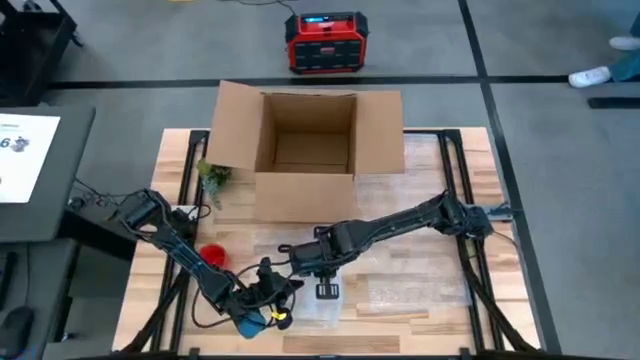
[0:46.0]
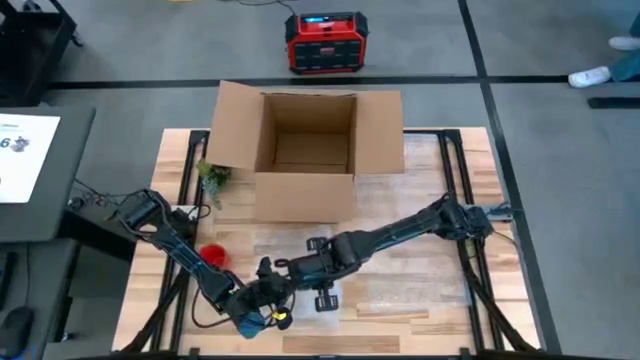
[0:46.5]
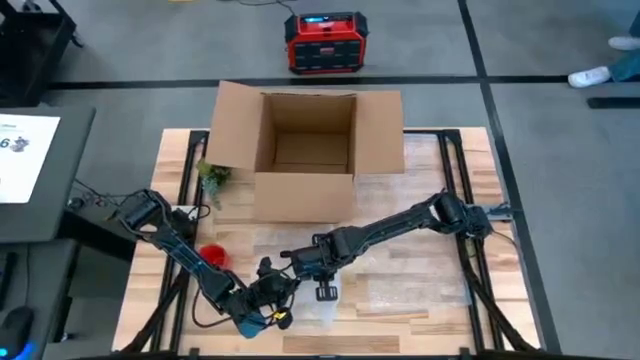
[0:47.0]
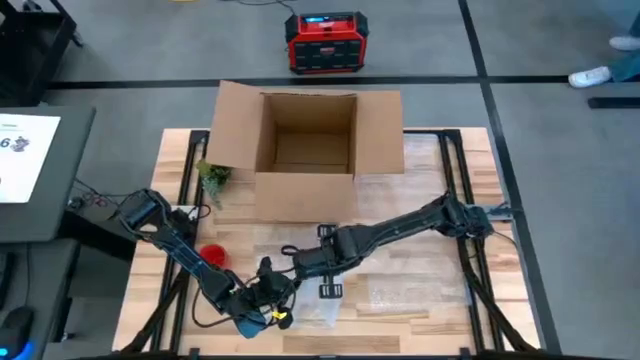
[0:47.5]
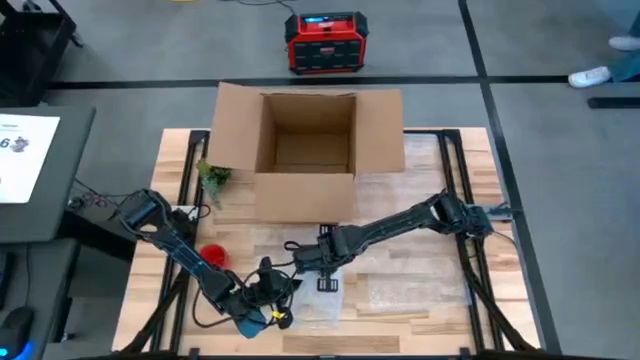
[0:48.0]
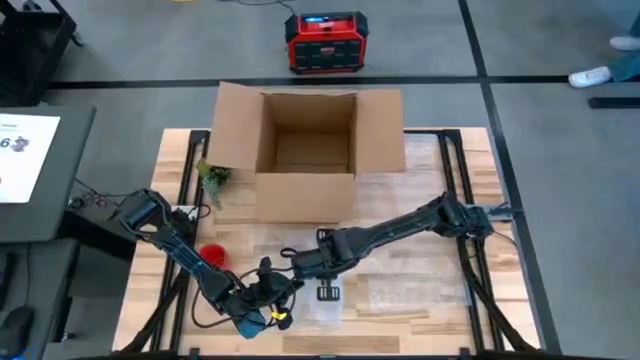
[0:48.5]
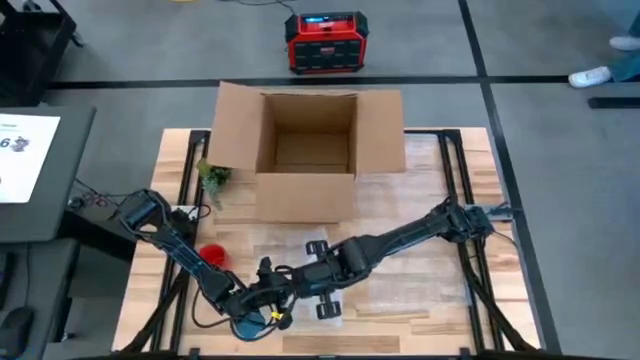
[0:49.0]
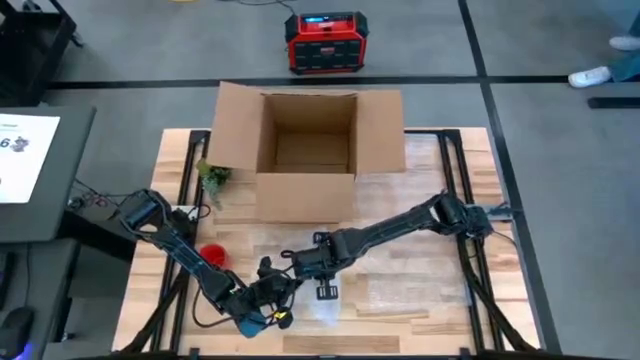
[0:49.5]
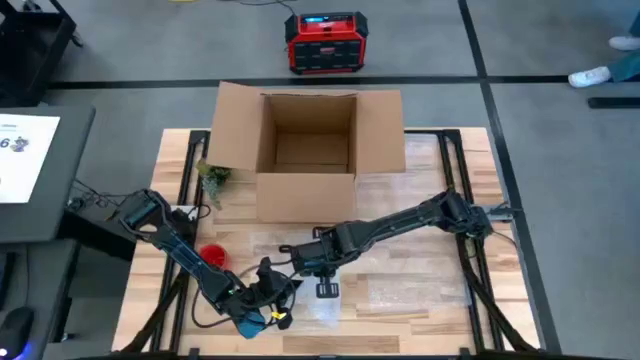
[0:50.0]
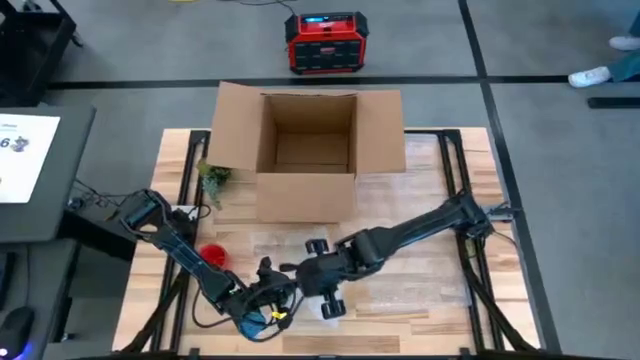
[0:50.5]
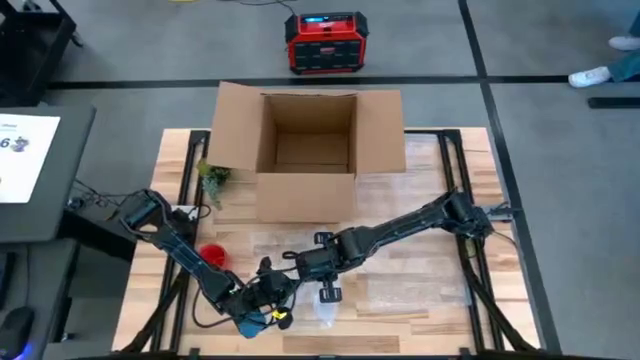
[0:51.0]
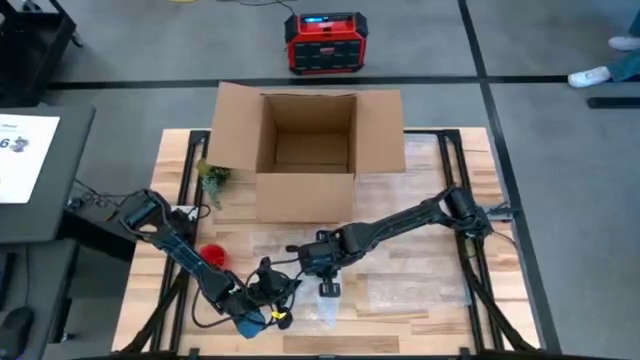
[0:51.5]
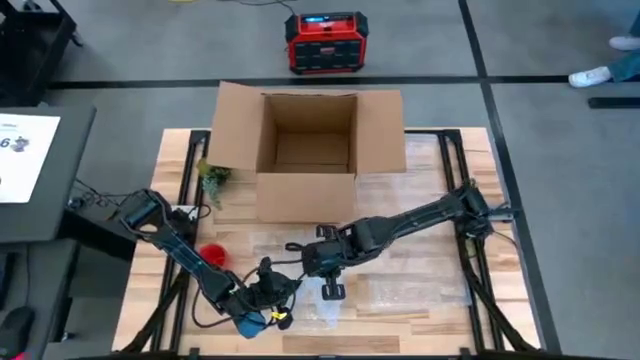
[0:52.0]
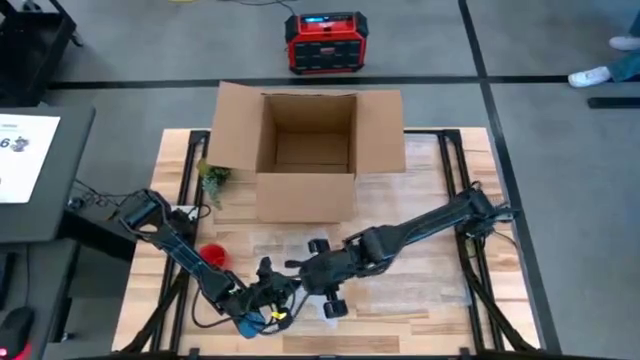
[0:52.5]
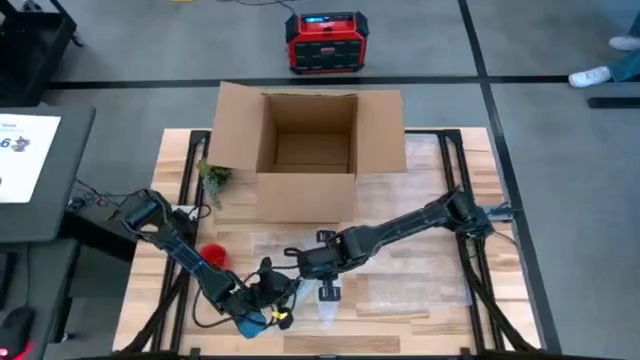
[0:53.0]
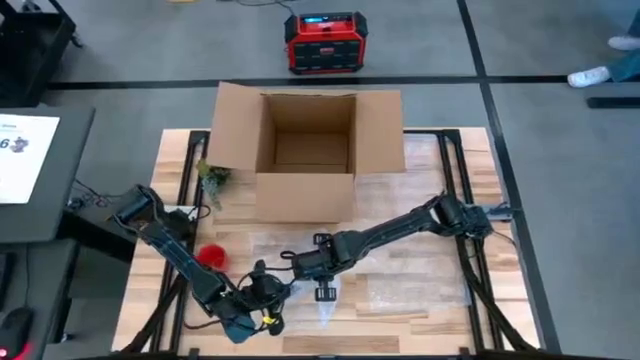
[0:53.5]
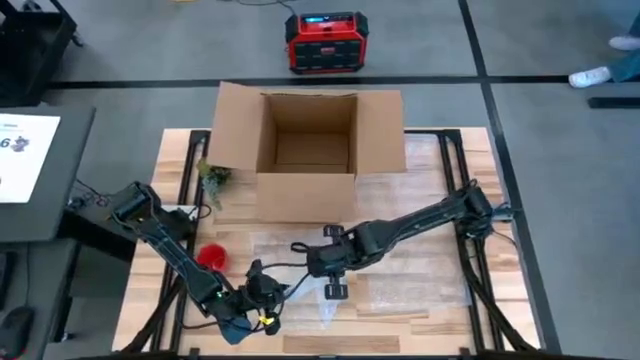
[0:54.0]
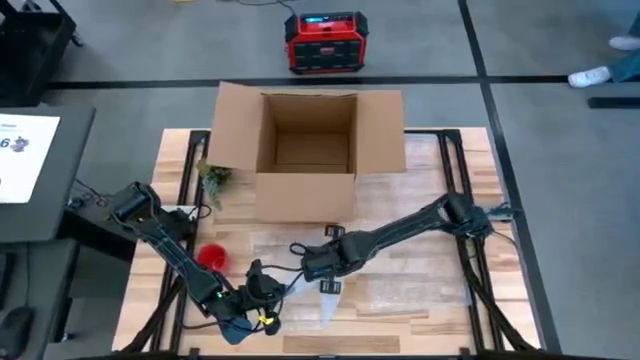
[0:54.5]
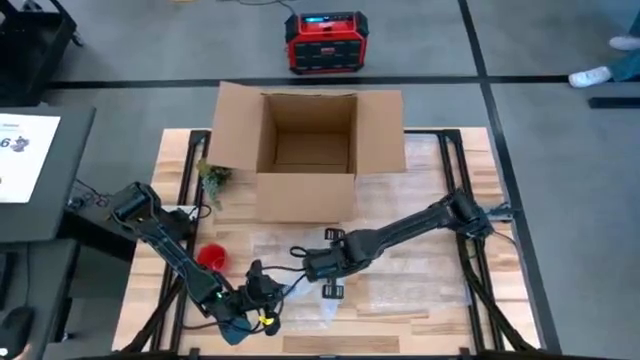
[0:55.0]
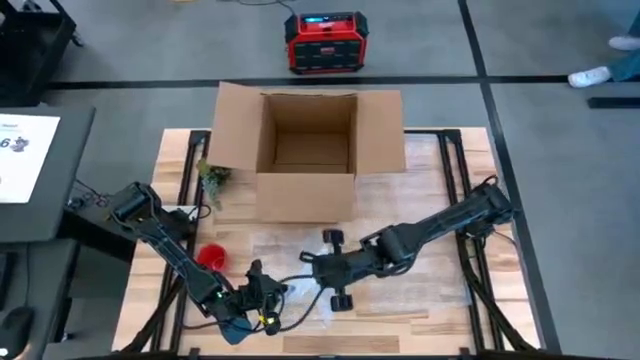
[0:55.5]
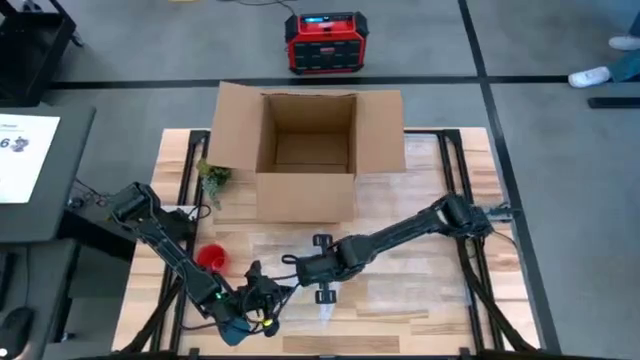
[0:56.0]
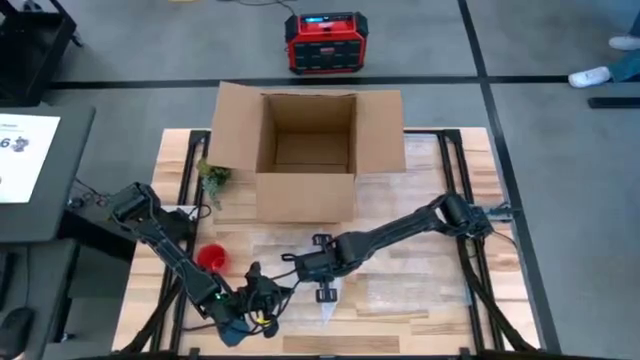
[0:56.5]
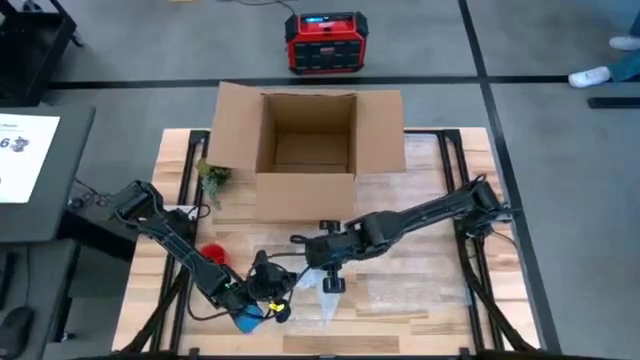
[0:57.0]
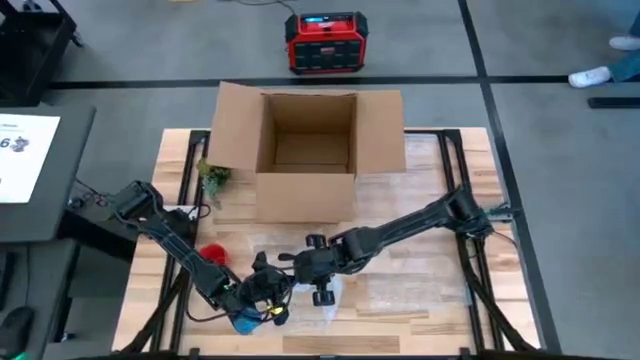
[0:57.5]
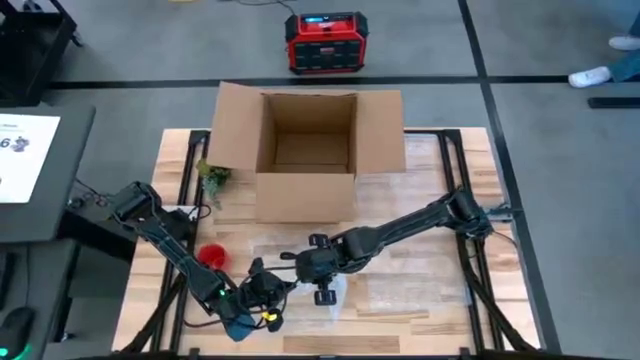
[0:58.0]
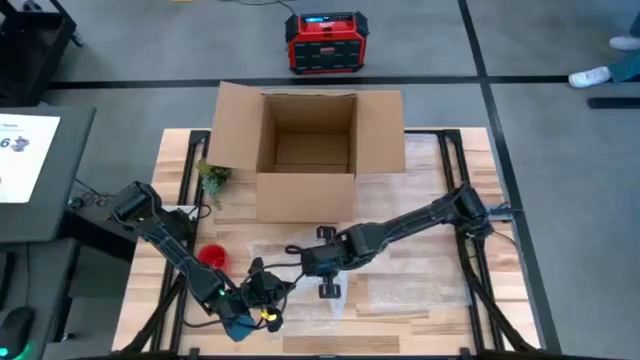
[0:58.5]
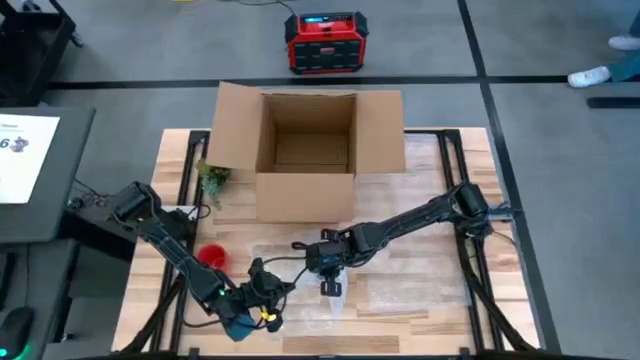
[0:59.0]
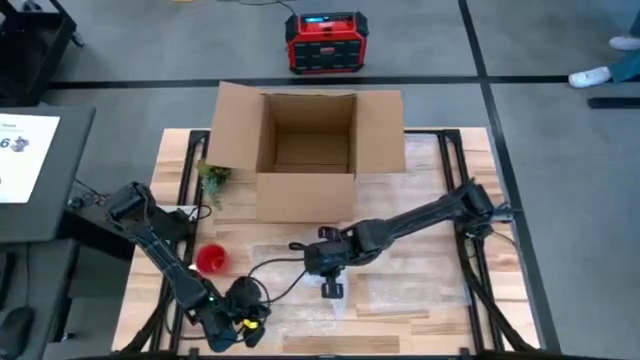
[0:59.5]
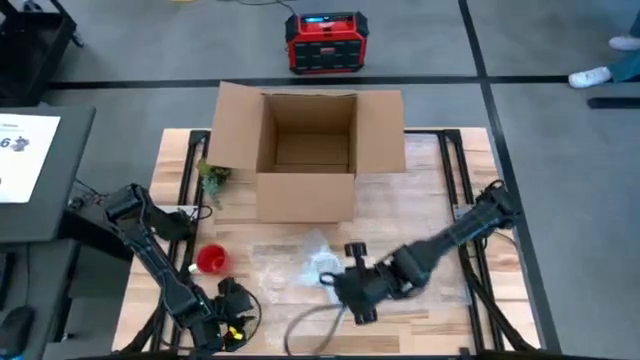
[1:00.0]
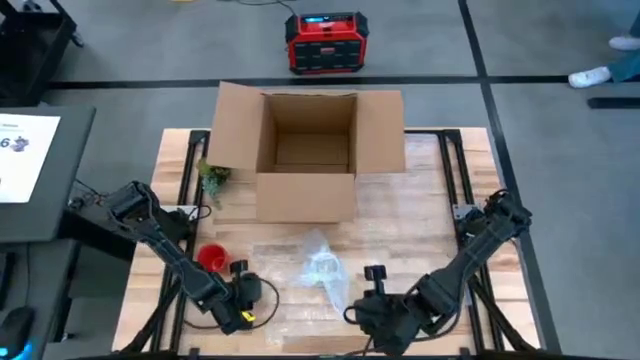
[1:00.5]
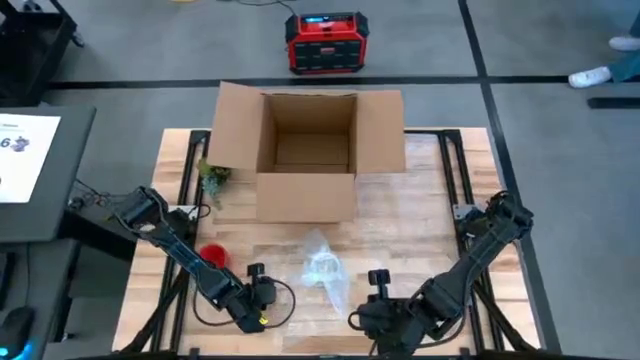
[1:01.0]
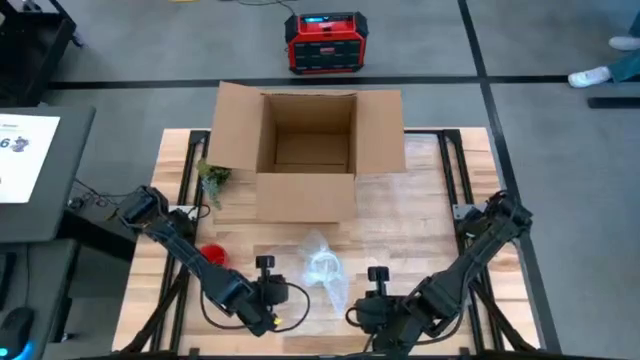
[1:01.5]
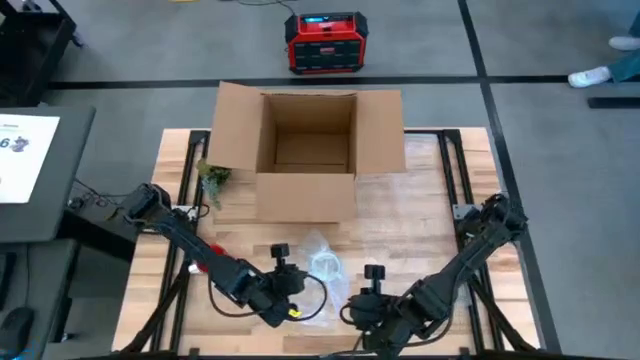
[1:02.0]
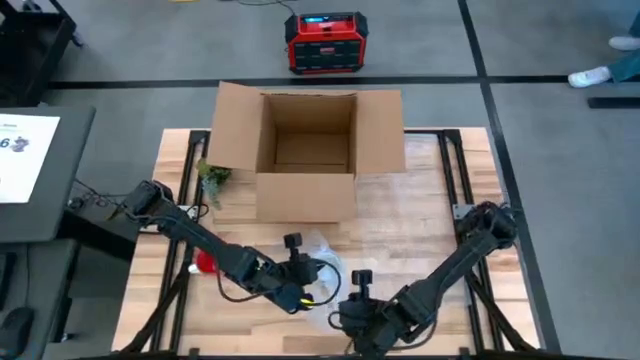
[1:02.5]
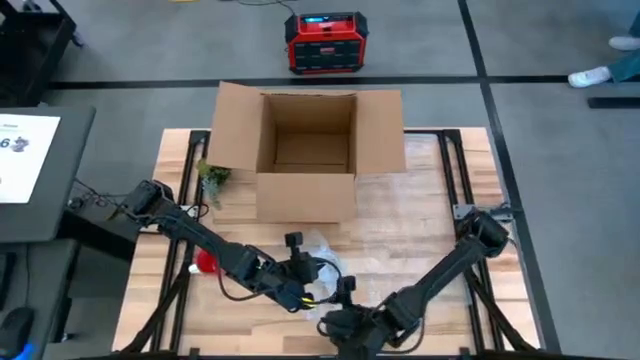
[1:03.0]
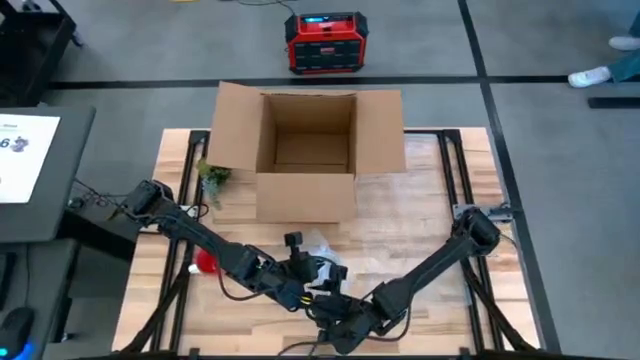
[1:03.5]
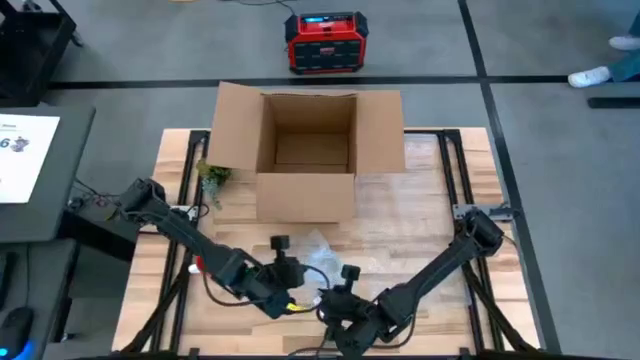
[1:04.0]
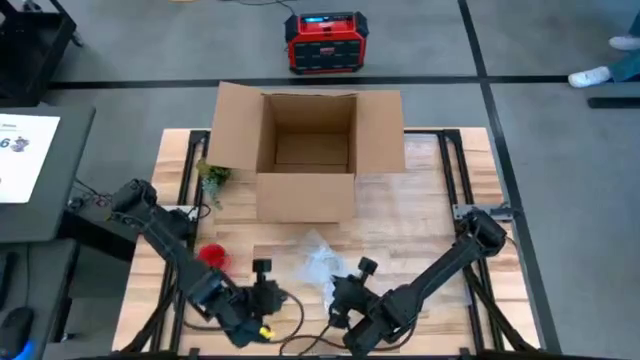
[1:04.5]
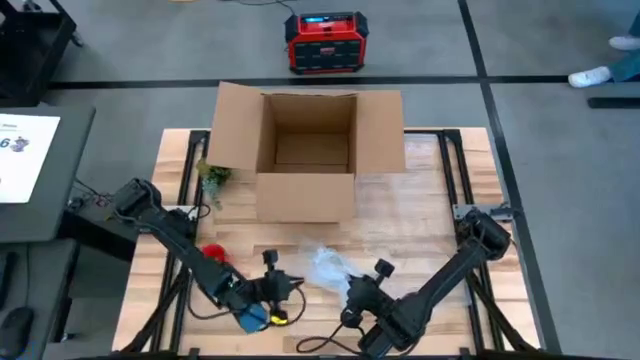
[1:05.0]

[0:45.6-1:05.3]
Task: wrap mug
Pack the white mug with the bubble wrap

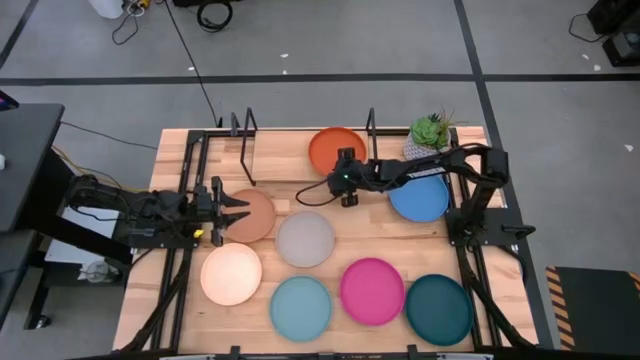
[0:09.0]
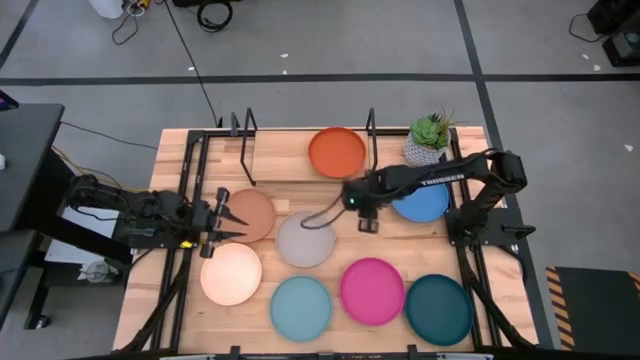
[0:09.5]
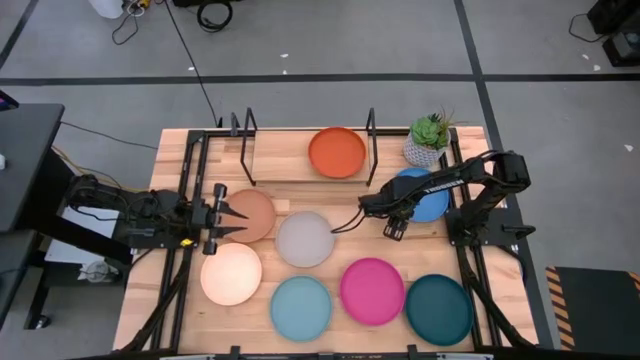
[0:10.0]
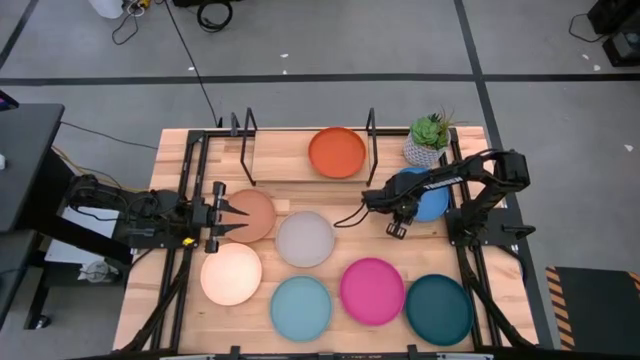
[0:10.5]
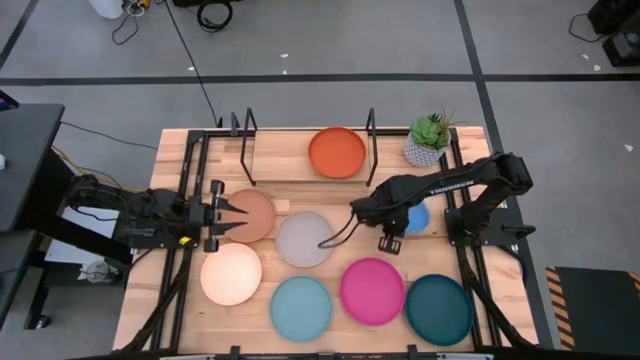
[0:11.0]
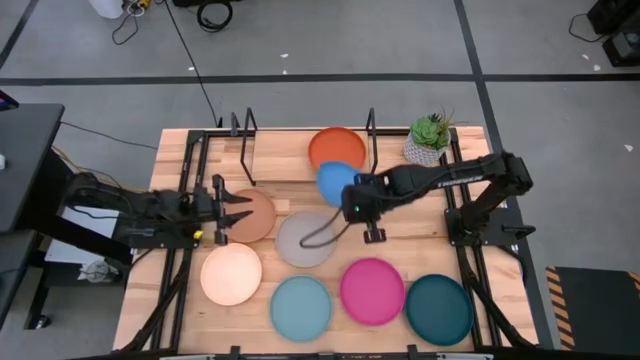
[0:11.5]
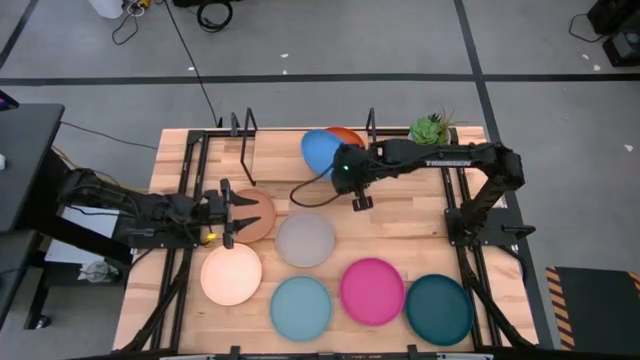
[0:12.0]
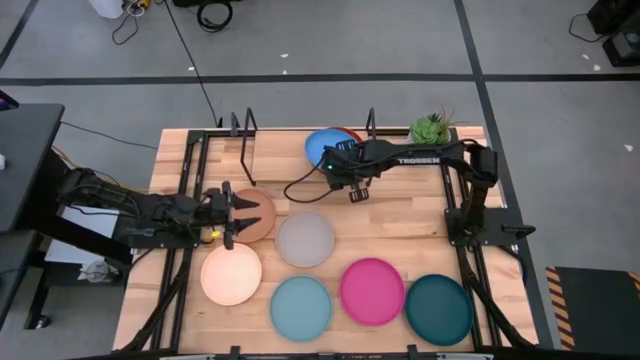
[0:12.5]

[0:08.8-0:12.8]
Task: Place and stack plates onto a shelf
Stack the blue plate on top of the orange plate on the shelf
